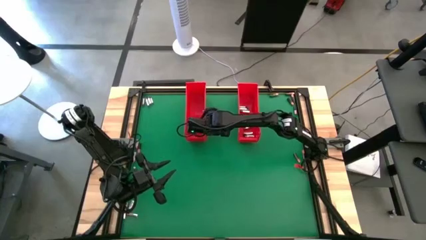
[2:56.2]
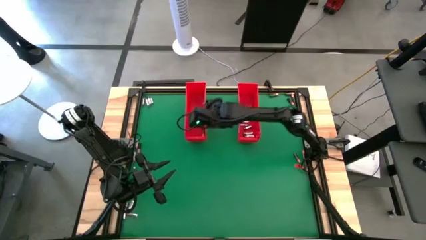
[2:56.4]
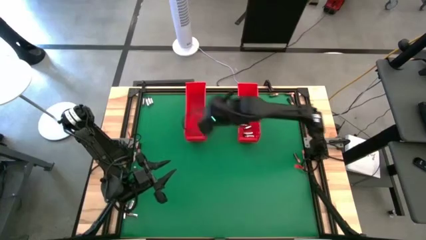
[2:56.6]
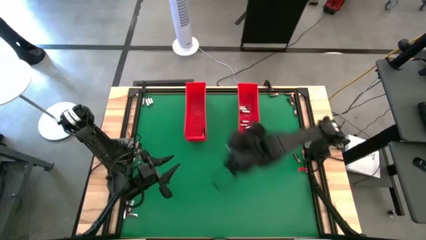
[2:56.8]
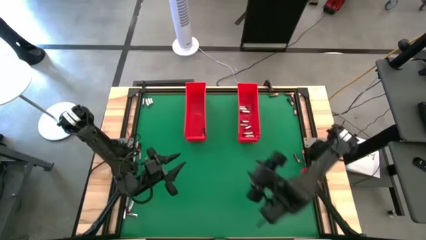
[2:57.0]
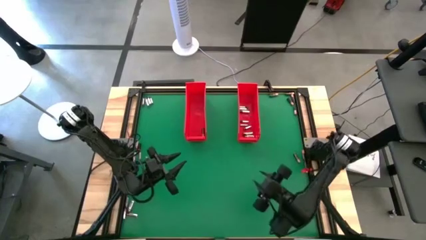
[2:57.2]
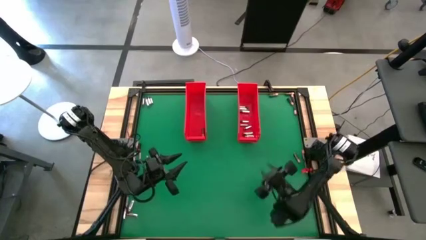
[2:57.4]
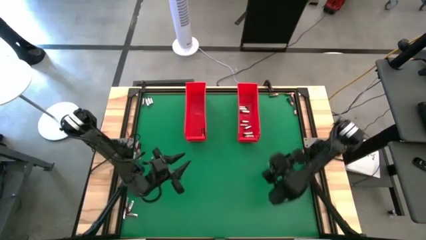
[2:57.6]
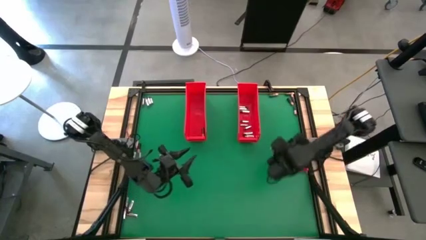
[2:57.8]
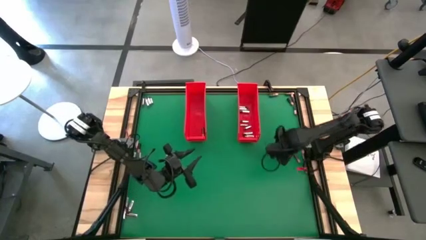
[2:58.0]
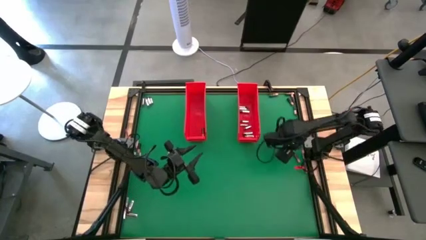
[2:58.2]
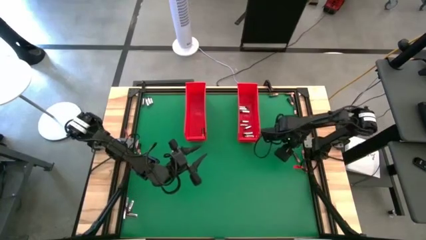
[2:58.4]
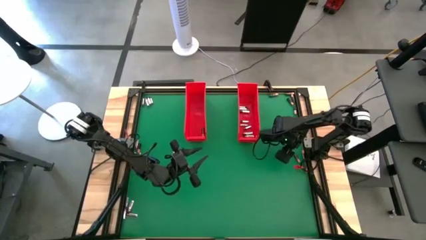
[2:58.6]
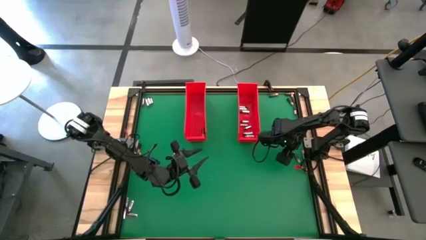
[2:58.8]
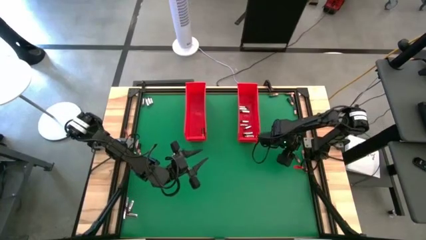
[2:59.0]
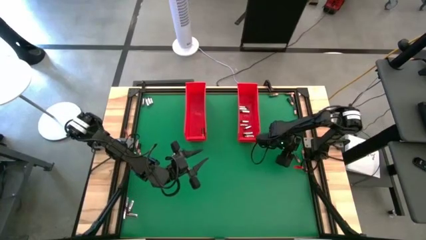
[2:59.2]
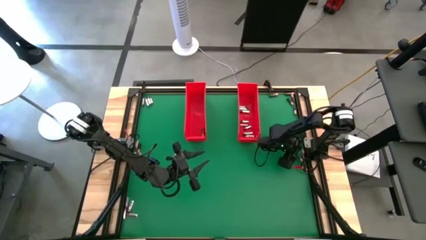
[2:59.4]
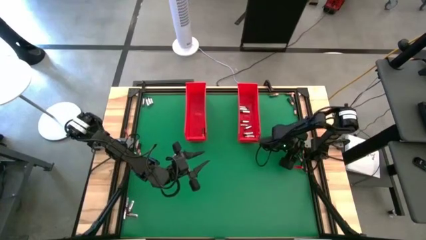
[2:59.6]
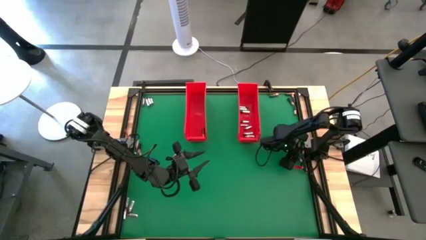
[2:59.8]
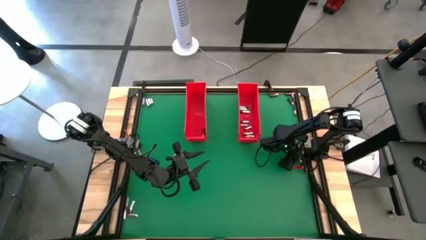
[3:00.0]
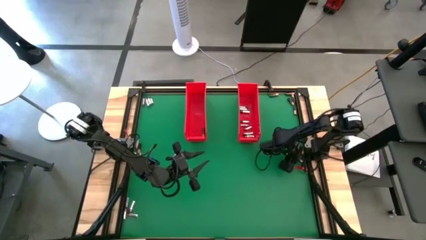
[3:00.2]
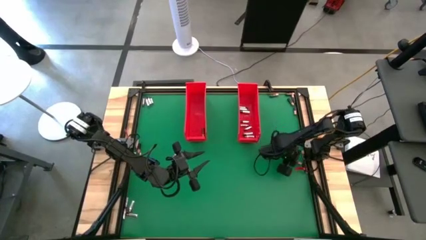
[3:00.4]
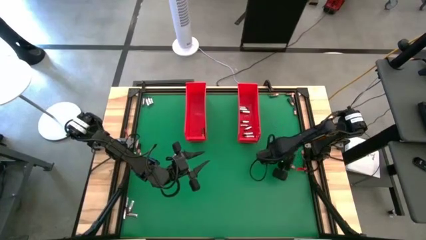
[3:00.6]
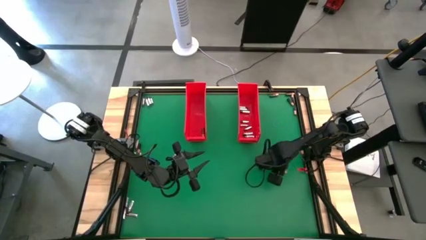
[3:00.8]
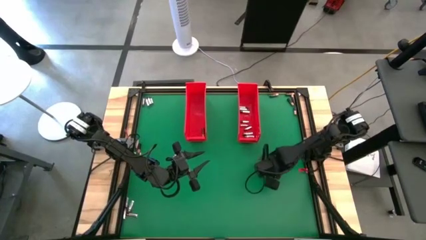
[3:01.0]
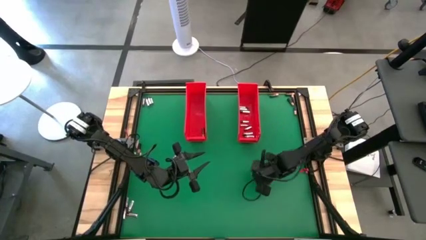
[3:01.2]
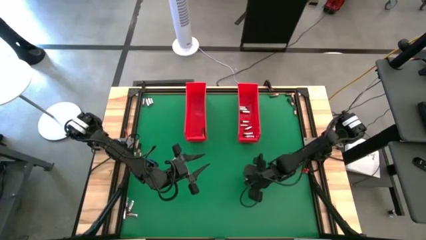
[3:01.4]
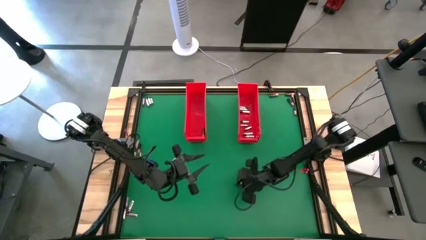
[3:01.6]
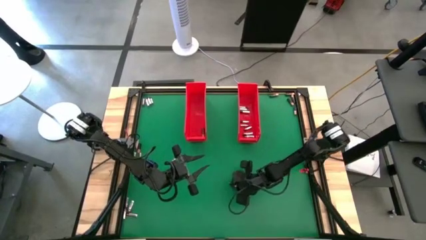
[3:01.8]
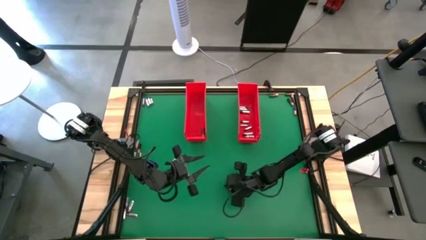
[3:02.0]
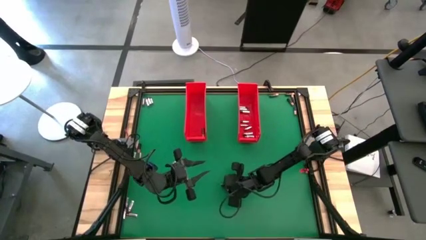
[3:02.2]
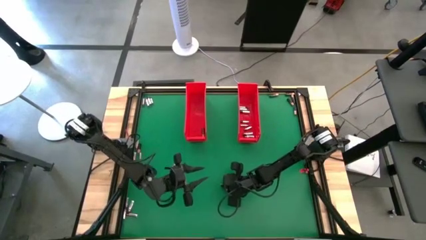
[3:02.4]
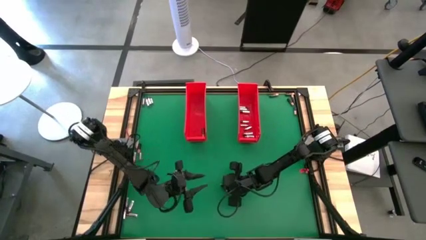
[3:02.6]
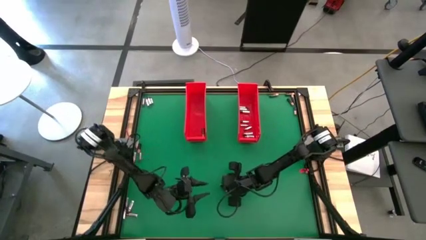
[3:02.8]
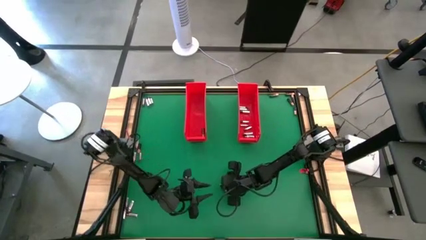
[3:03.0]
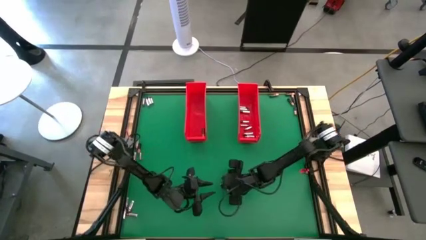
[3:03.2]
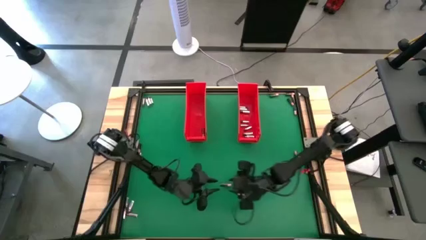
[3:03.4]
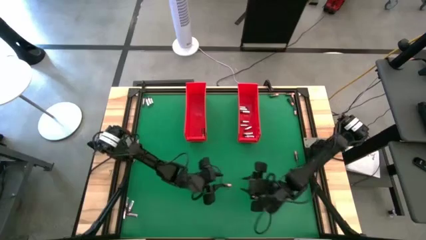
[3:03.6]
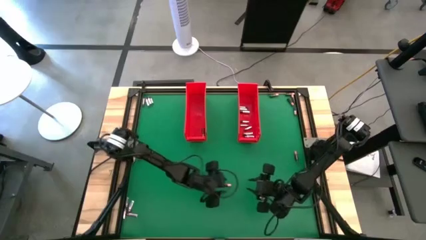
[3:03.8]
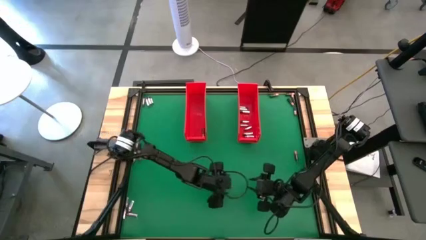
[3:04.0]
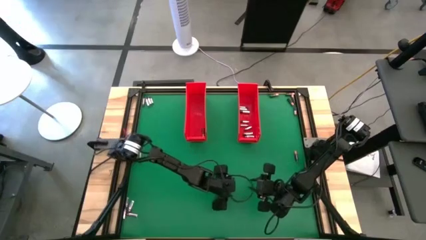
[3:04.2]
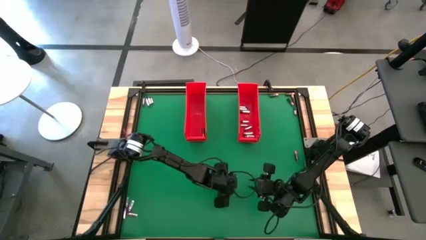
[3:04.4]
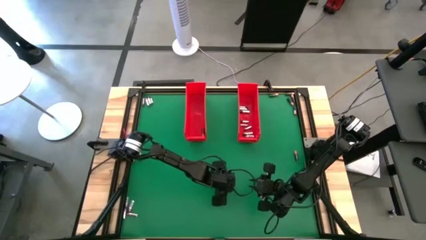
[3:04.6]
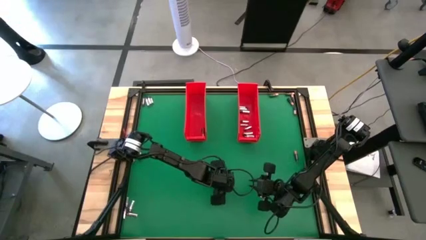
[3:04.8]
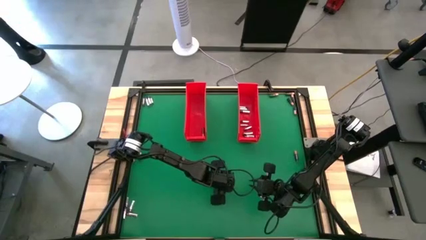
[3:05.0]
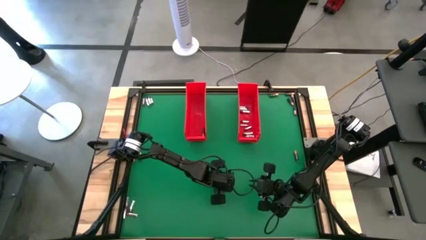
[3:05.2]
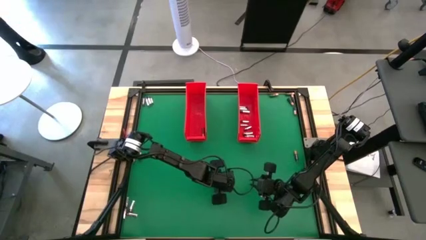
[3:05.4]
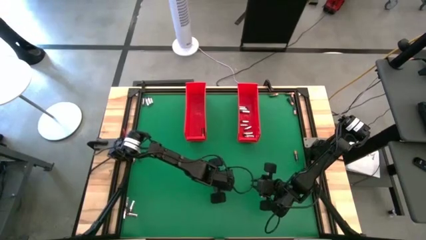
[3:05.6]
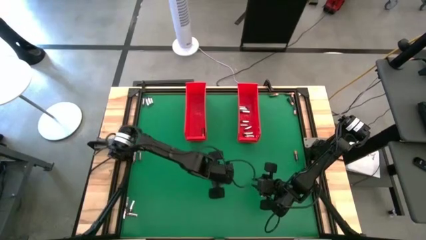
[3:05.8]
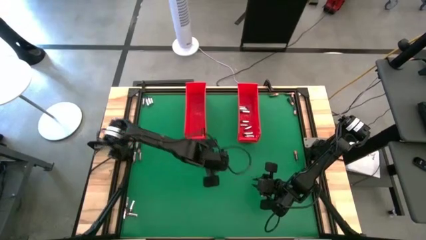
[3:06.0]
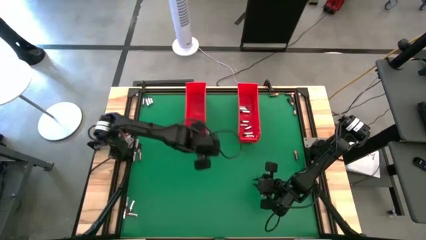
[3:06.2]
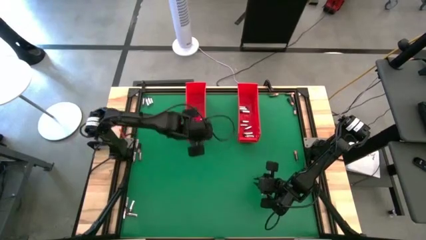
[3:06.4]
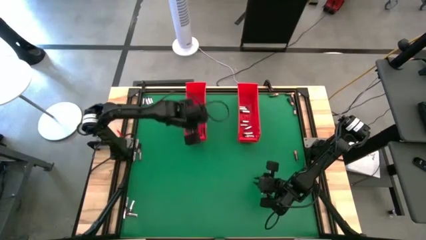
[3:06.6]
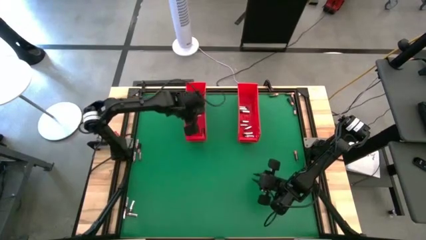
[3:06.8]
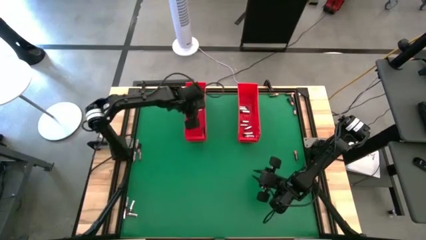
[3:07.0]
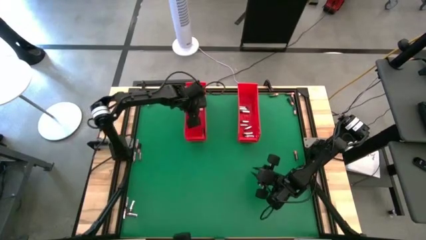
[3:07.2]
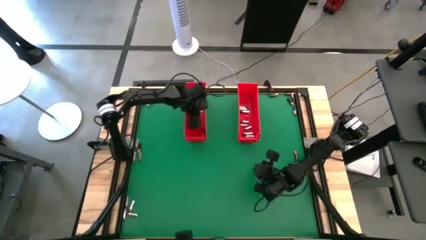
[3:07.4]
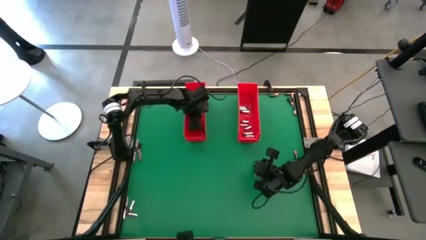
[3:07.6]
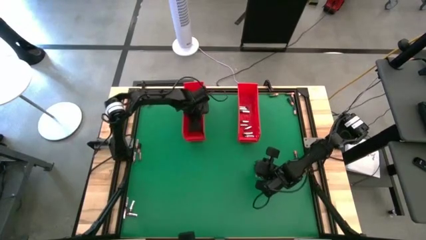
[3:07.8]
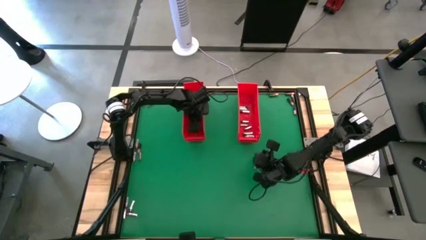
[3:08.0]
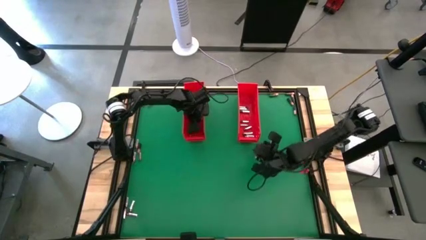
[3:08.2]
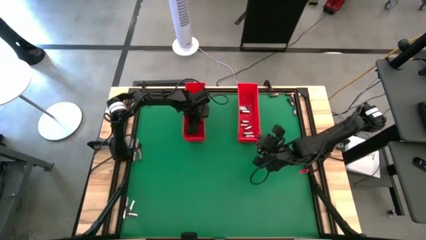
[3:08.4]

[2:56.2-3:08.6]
Task: Sort batteries
Put the brown battery into the left red bin

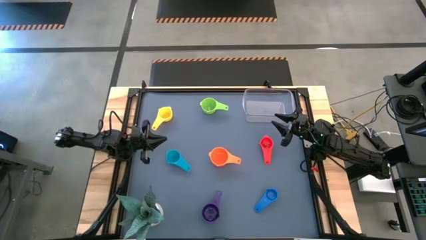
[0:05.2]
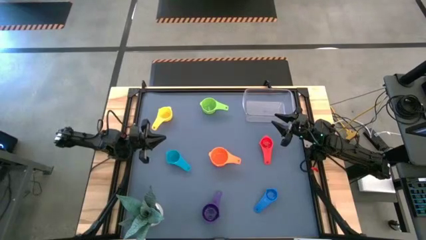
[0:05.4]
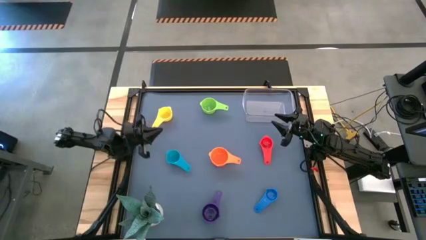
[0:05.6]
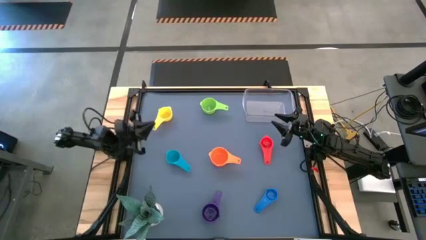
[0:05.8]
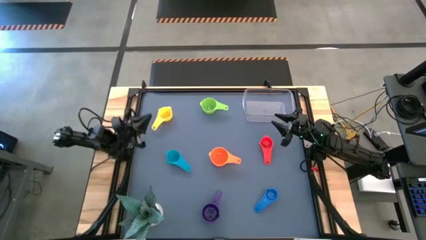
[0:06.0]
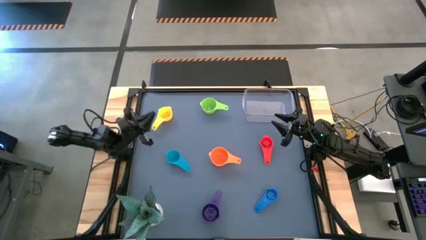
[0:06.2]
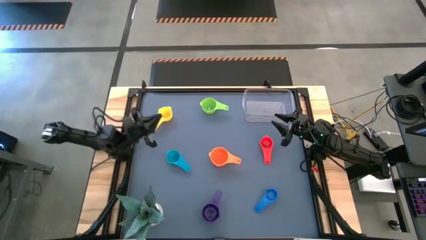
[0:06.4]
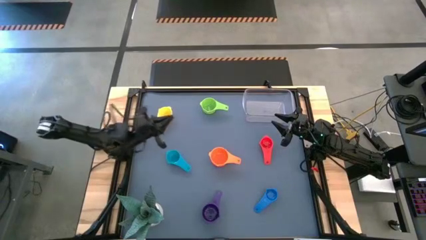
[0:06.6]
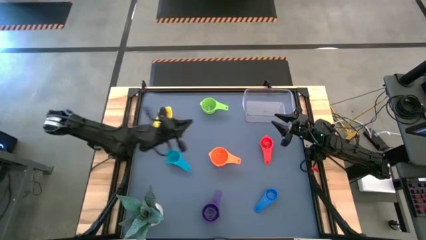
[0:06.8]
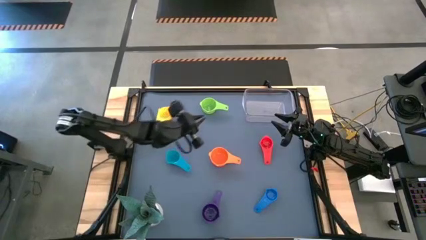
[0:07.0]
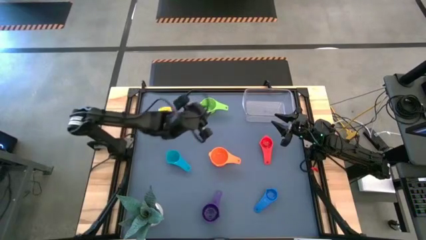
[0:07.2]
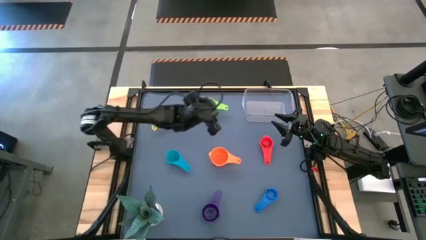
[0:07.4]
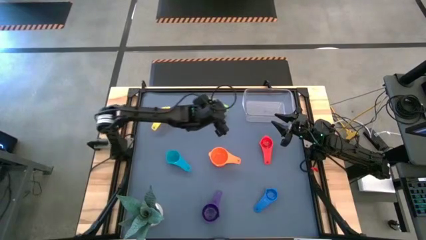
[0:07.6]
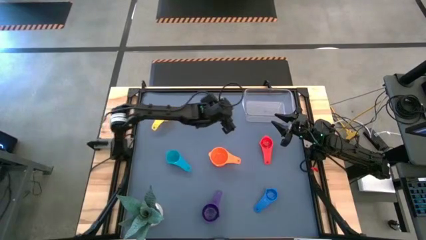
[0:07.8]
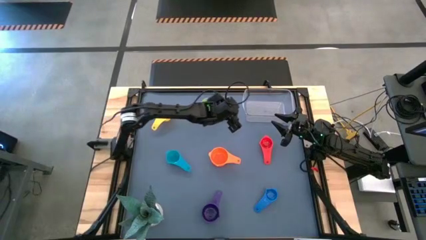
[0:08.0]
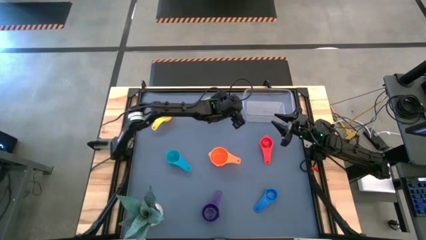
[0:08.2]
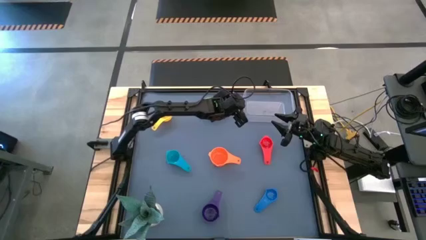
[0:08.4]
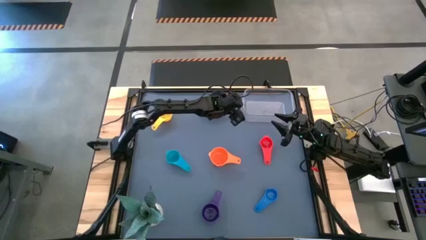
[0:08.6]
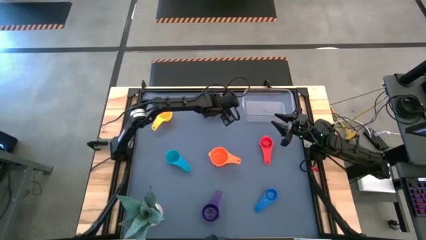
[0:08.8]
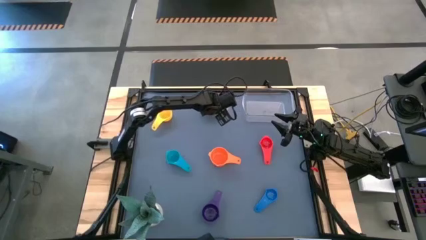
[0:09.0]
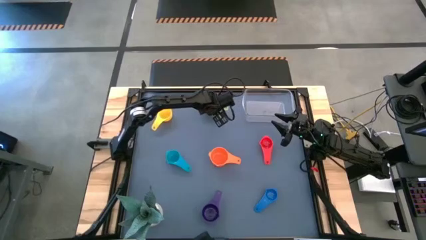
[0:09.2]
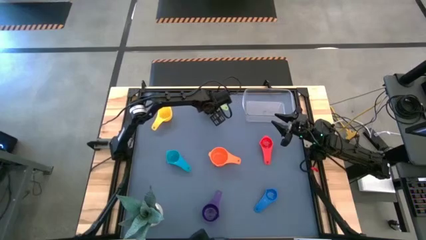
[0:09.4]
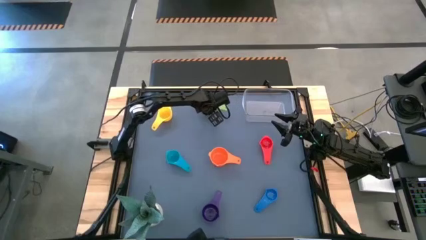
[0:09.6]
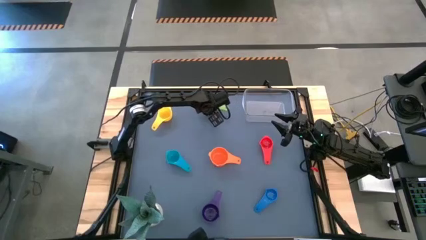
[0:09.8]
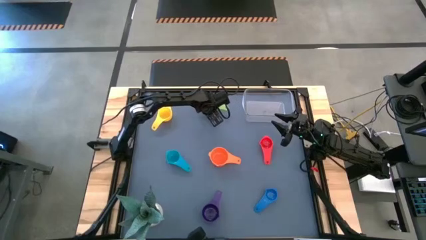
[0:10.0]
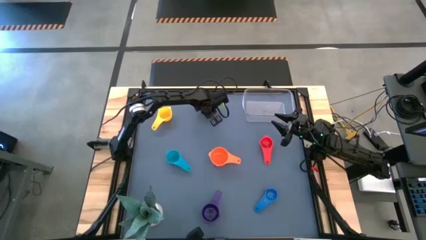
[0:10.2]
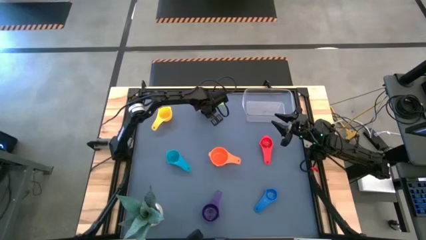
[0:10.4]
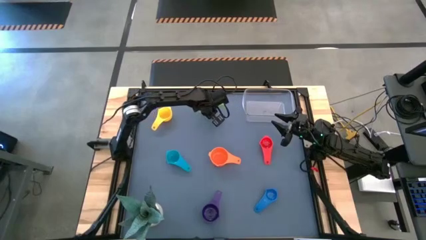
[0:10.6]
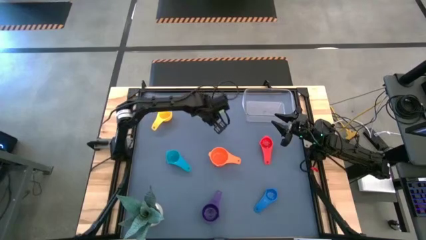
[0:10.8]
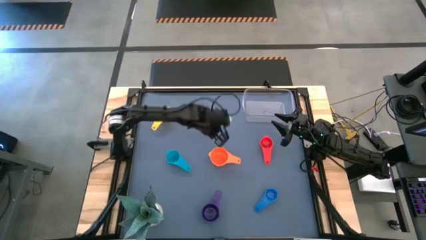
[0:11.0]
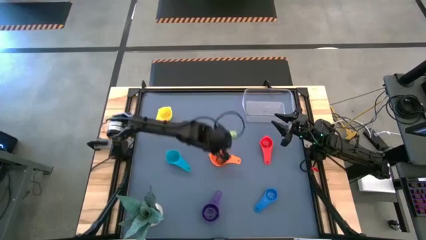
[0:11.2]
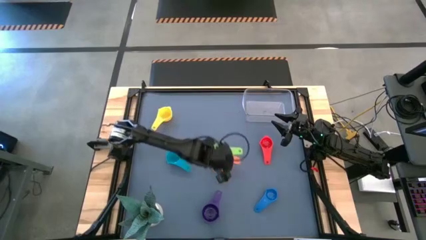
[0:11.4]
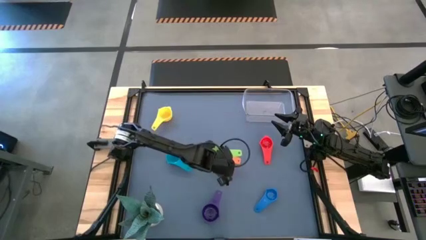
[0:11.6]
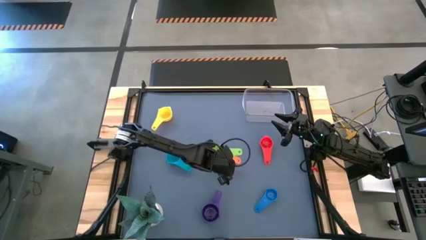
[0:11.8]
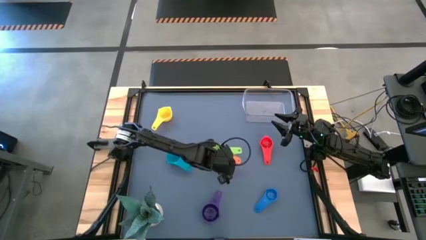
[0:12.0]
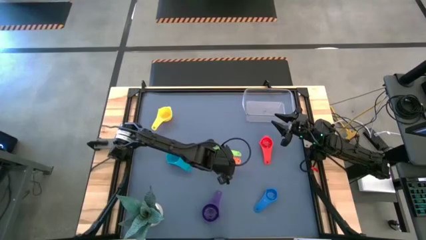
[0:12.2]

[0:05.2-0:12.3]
Task: Nest measuring cups in basket
Stack the light green measuring cup on top of the orange measuring cup
